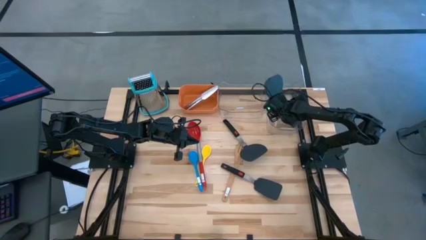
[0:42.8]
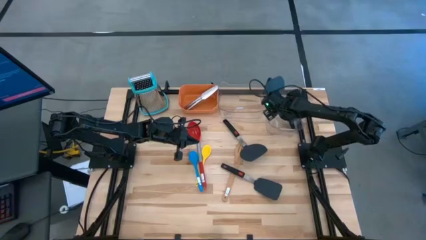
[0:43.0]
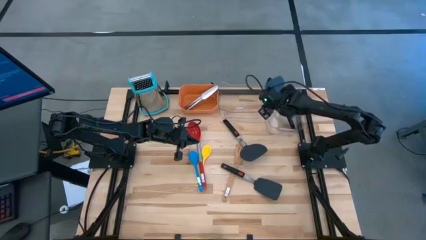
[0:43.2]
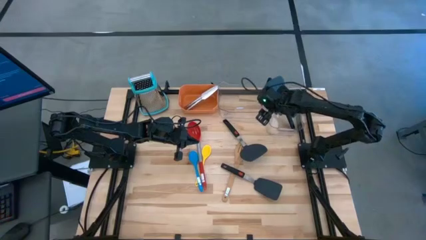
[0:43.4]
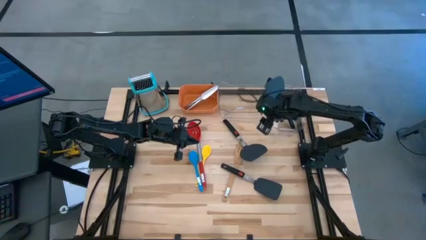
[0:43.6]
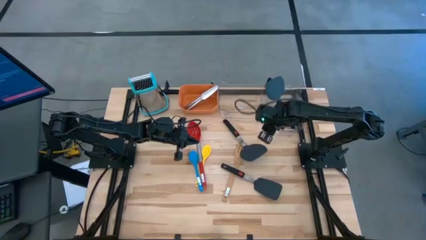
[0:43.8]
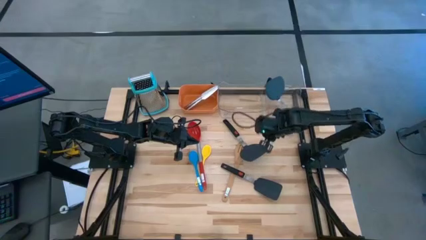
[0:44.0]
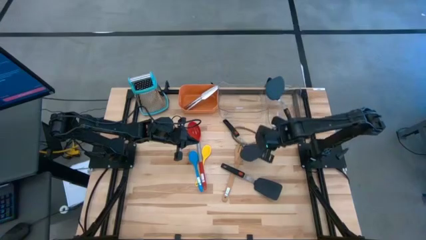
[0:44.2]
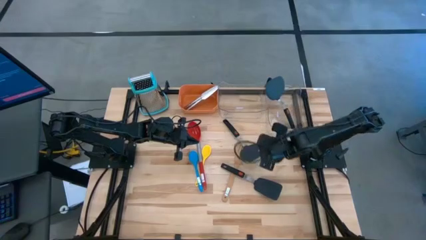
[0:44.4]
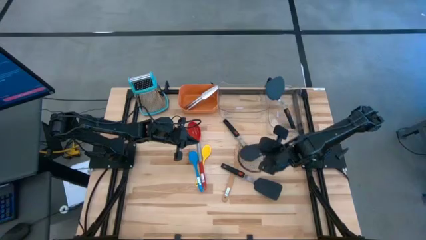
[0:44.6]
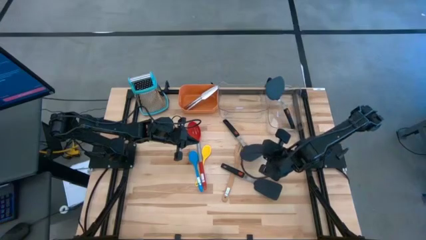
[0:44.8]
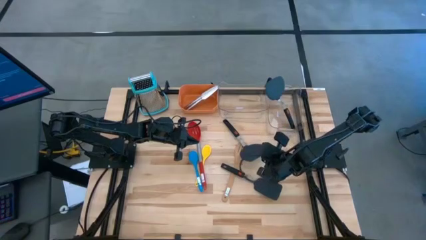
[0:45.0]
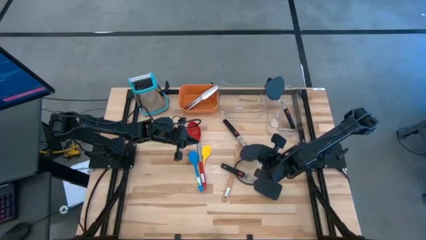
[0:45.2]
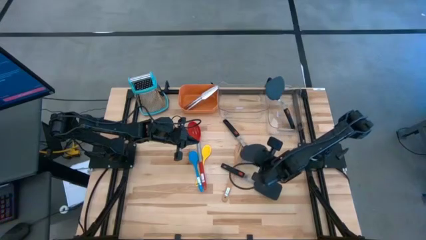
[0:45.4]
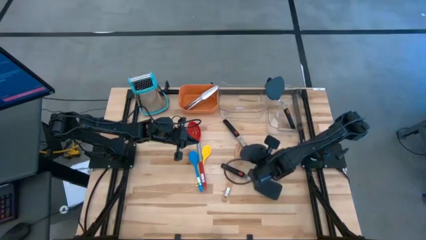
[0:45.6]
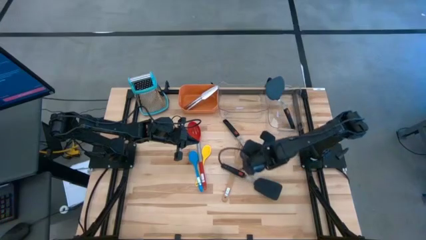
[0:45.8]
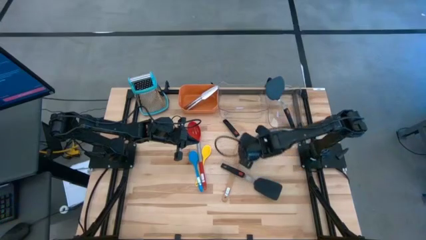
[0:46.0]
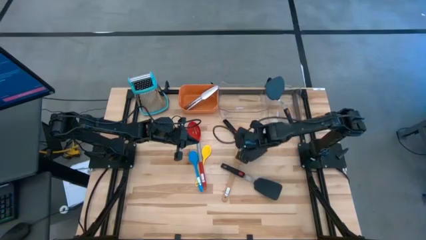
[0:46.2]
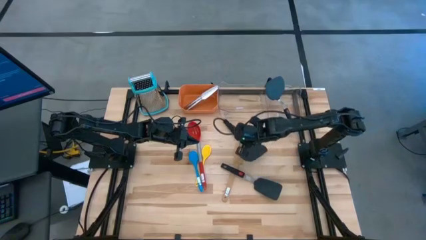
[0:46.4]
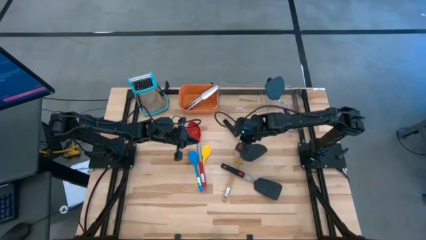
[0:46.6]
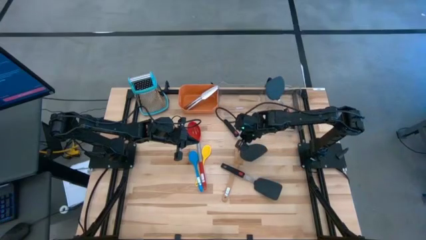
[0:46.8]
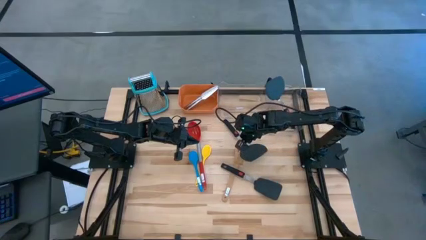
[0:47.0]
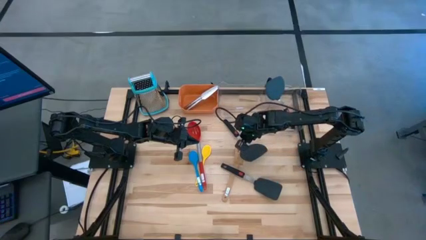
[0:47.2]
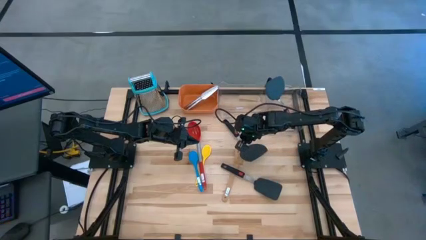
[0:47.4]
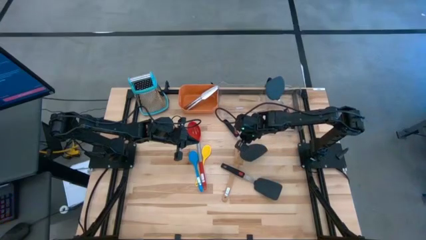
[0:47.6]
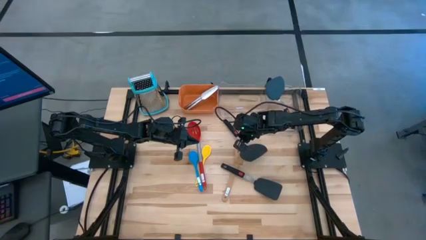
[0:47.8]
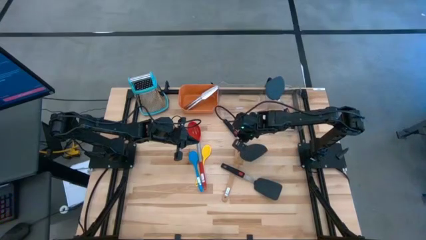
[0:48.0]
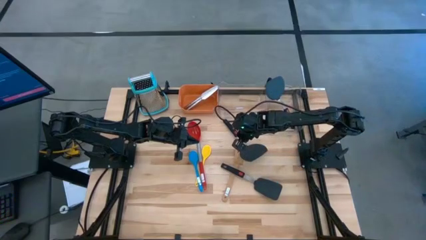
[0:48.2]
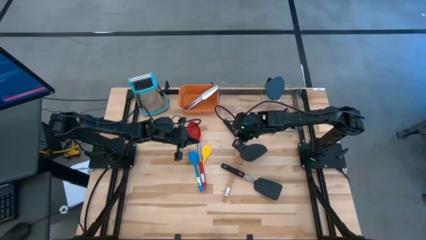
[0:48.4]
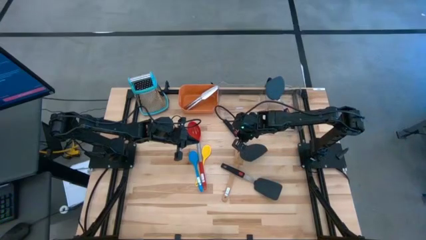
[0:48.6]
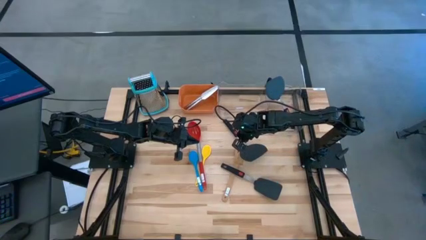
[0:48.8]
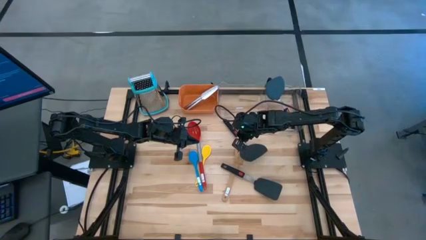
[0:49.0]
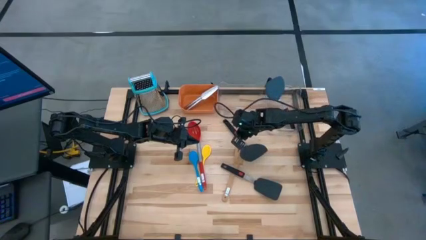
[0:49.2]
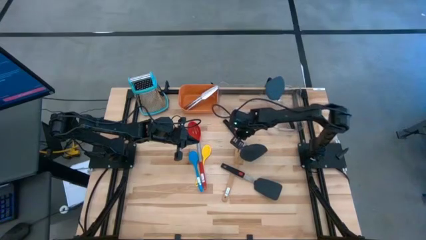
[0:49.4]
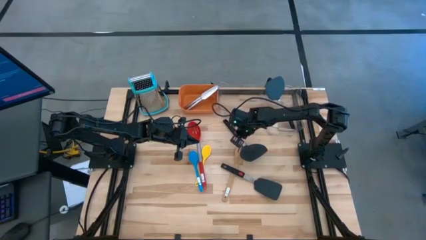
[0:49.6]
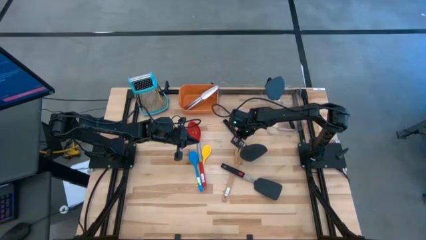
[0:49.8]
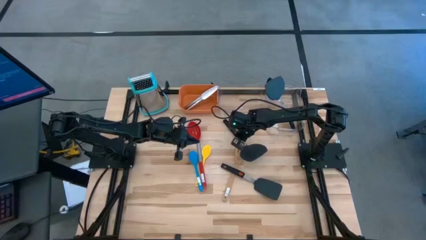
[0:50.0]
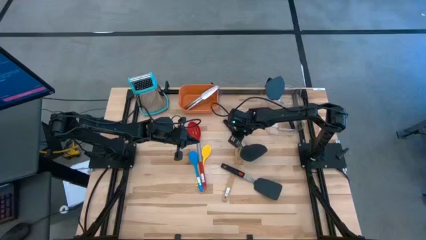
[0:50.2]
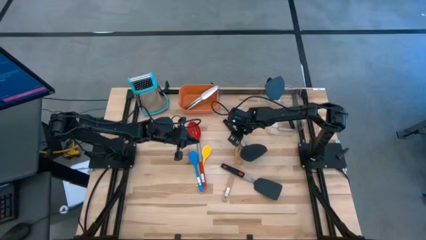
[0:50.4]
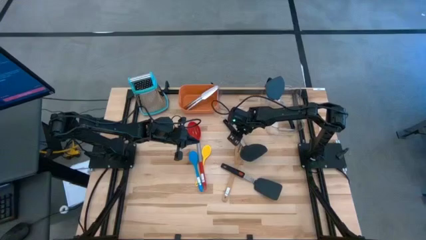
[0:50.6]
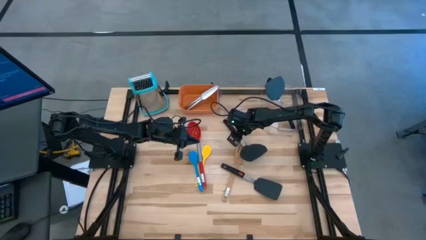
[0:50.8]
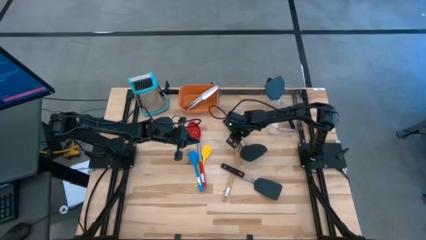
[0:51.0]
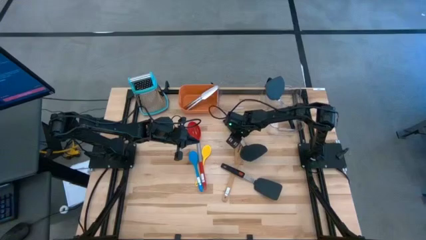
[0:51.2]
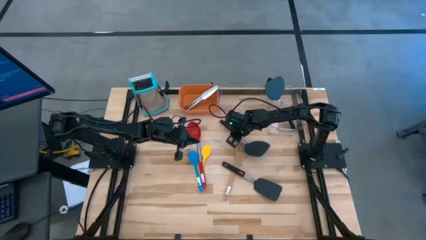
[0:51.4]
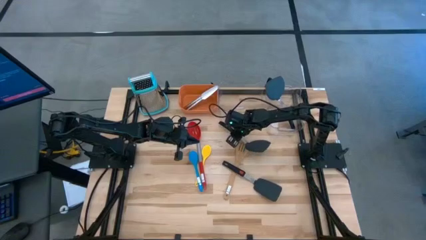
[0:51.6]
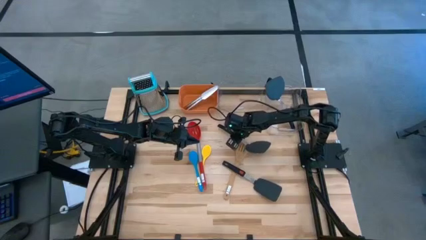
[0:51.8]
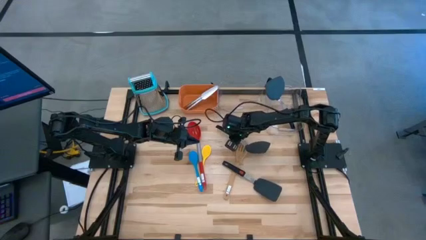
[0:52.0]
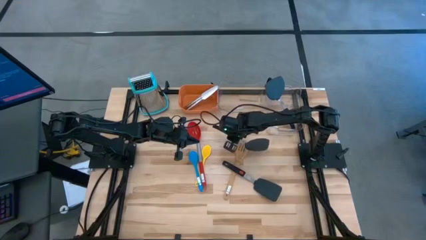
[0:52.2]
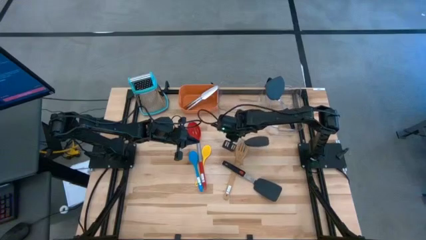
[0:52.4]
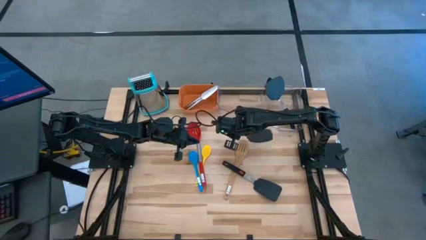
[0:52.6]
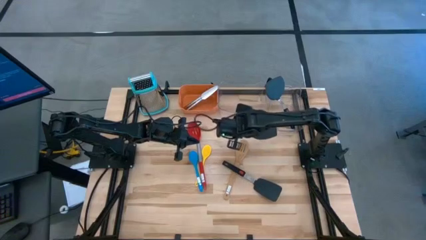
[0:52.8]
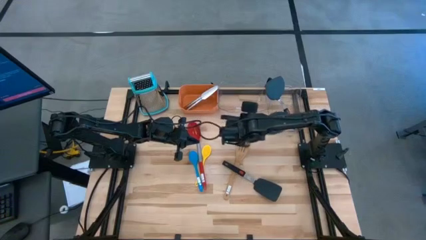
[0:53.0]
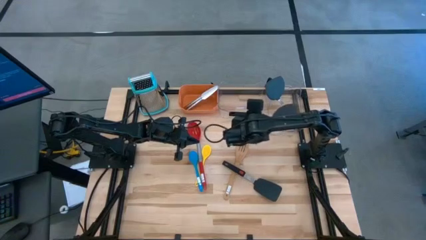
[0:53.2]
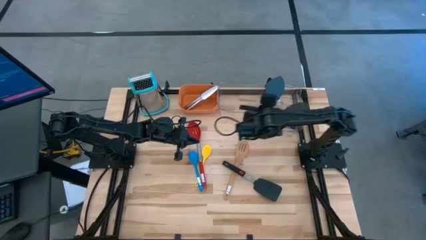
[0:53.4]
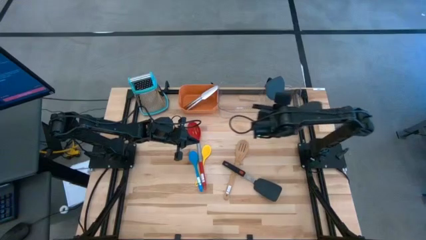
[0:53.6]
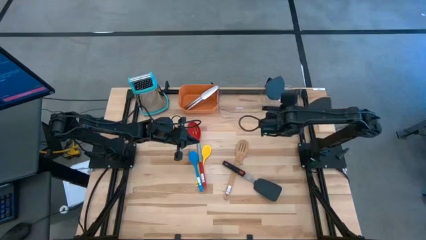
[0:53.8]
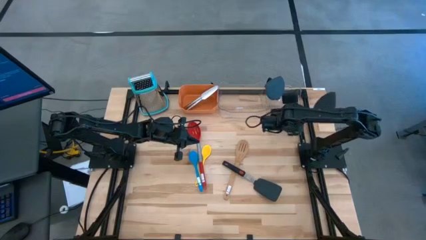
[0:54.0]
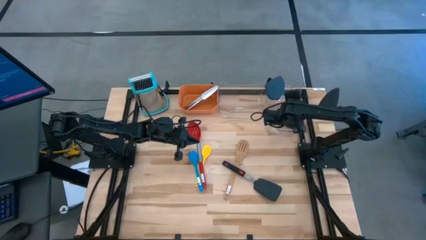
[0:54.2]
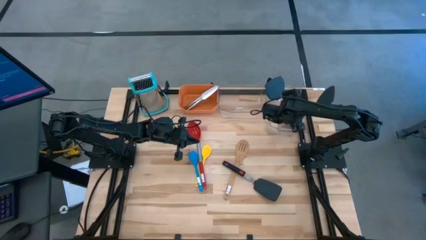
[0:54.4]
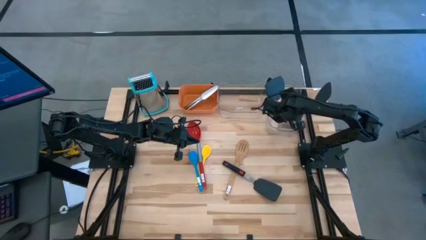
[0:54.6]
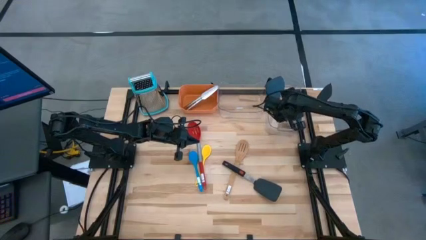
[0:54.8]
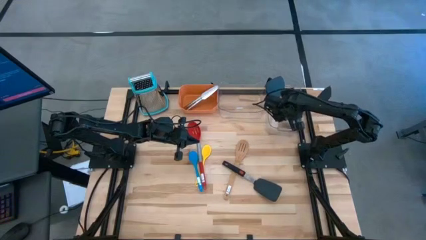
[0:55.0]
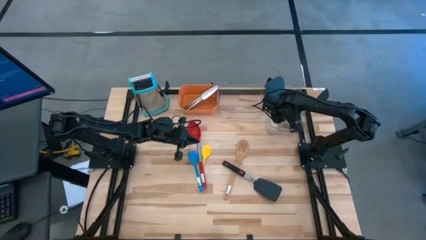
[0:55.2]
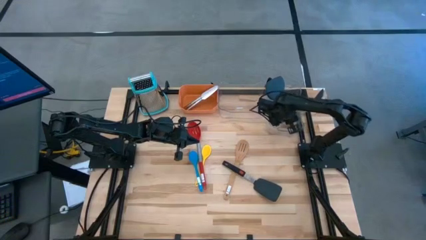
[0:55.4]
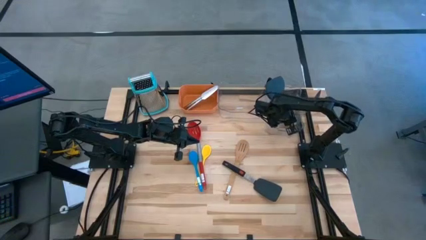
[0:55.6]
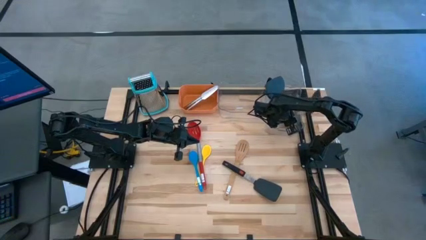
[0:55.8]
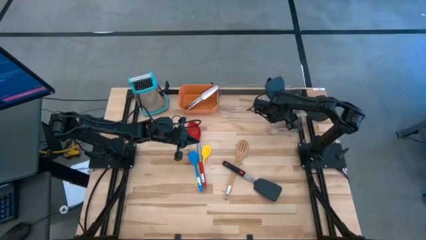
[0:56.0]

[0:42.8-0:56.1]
Task: Pick & Place Kitchen Items
Put the black spatula into the right transparent bin

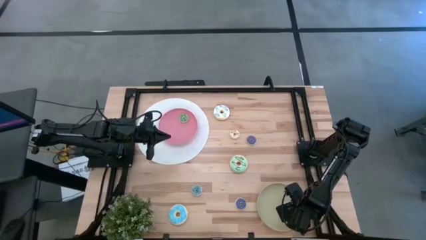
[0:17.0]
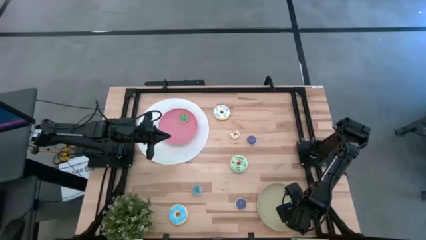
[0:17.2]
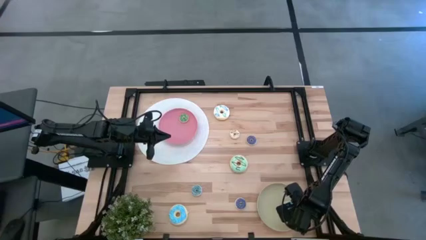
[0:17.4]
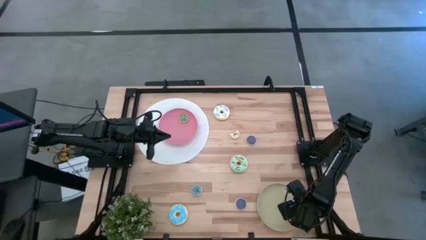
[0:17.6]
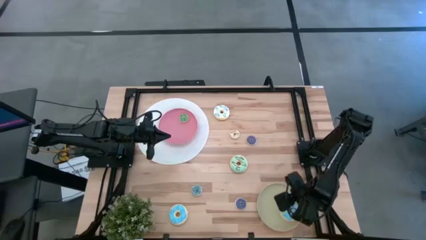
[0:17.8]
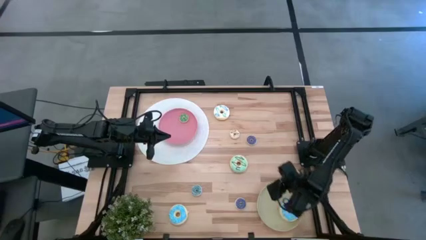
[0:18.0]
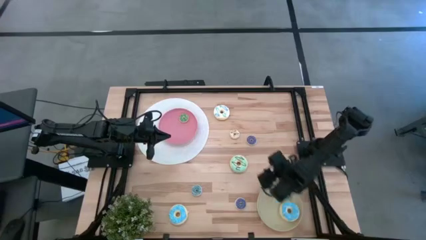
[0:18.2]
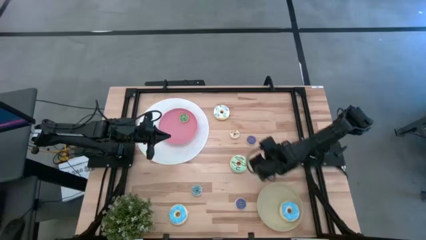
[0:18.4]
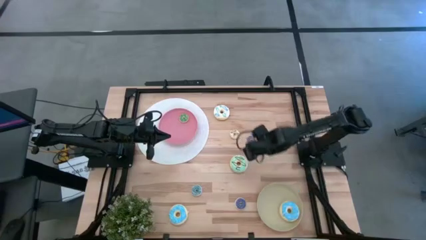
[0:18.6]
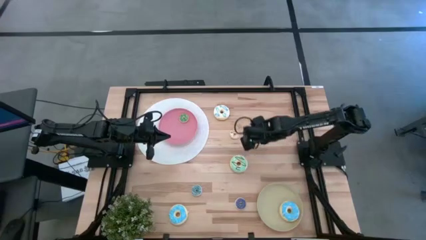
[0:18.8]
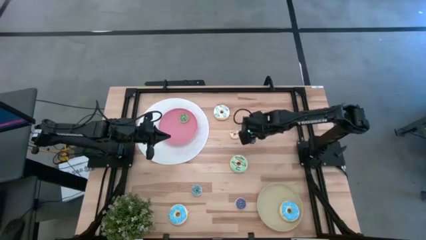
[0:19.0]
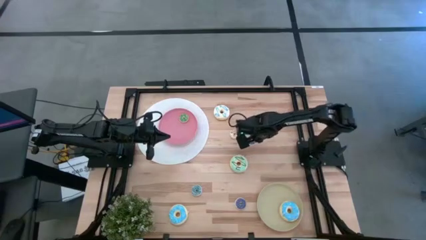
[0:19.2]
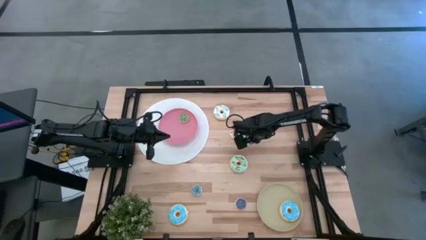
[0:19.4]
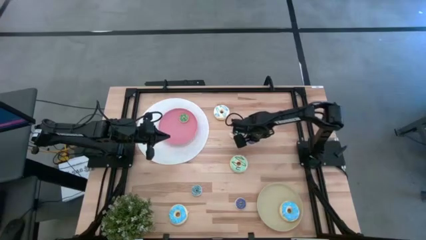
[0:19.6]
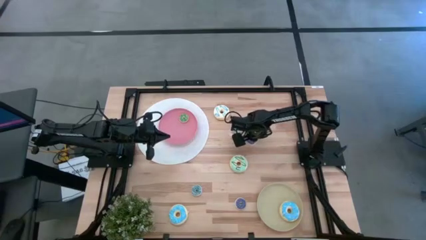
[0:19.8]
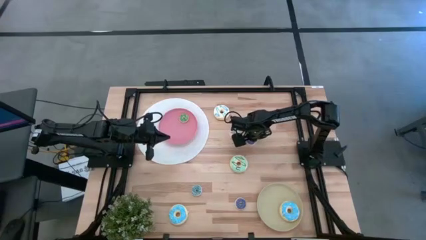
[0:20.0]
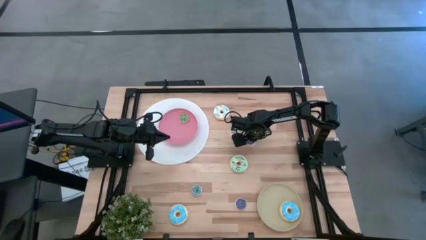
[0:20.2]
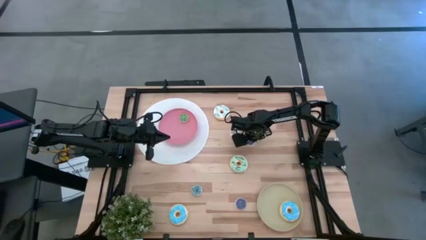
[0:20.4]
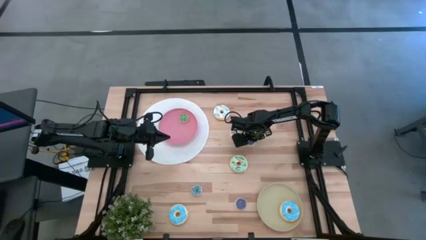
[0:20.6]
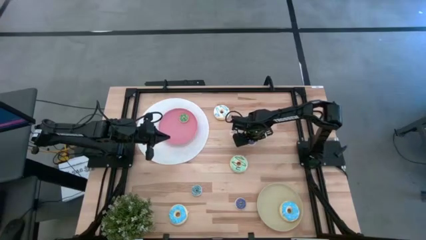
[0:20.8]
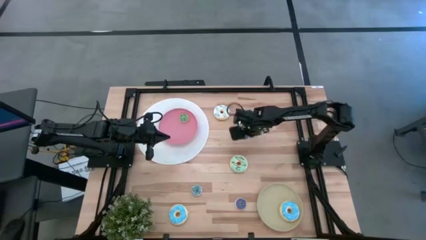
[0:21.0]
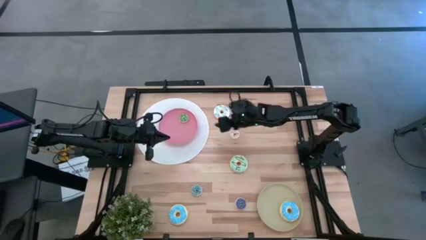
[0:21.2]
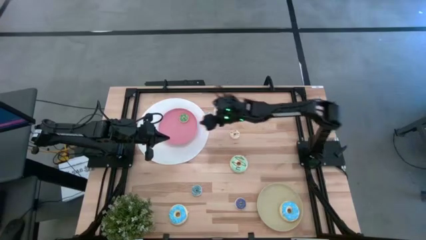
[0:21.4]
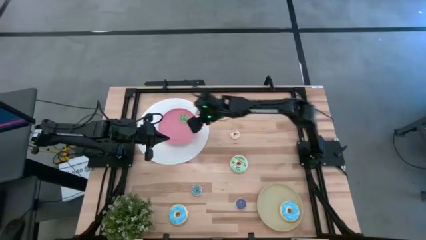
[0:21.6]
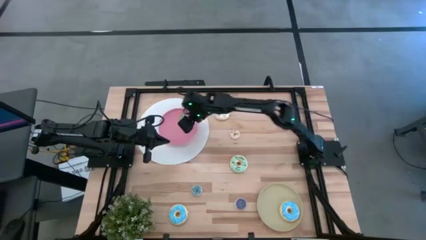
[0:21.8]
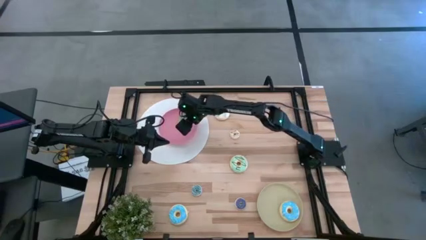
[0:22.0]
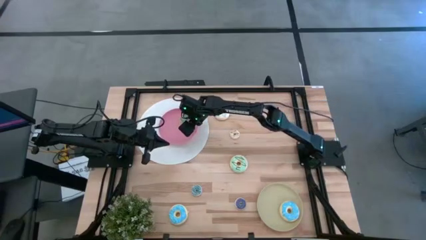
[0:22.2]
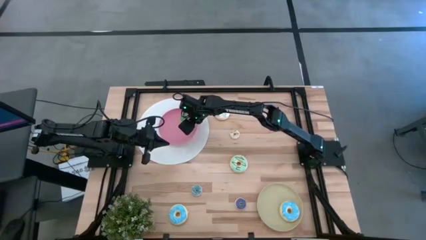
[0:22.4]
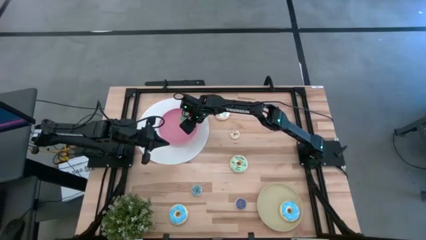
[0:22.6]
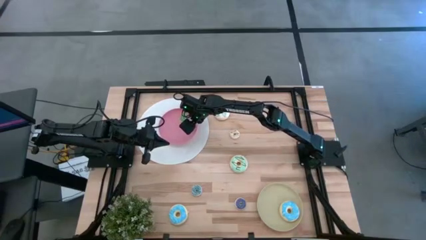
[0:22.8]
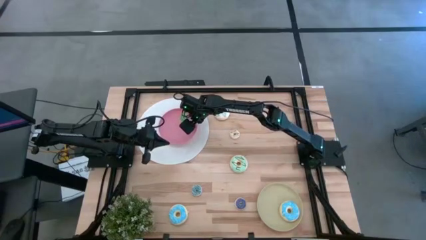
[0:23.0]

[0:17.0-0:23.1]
Task: Pick & Place donuts
Put the small violet donut on the pink plate
